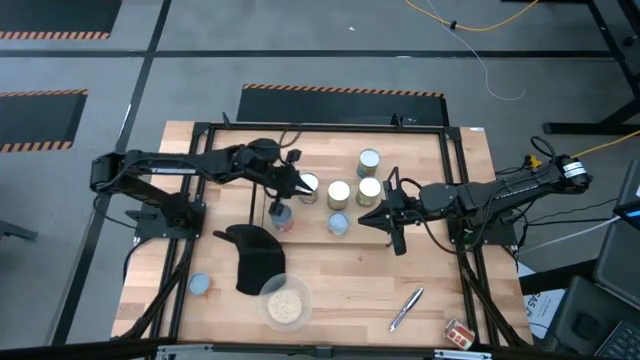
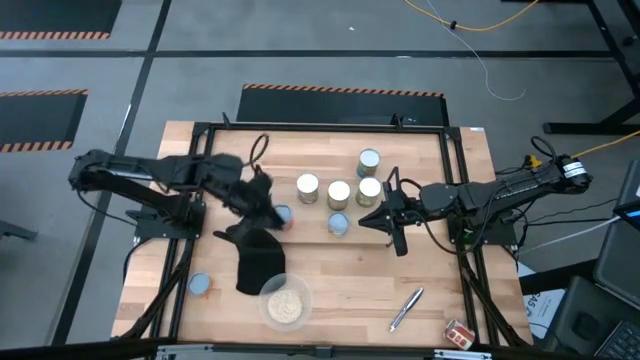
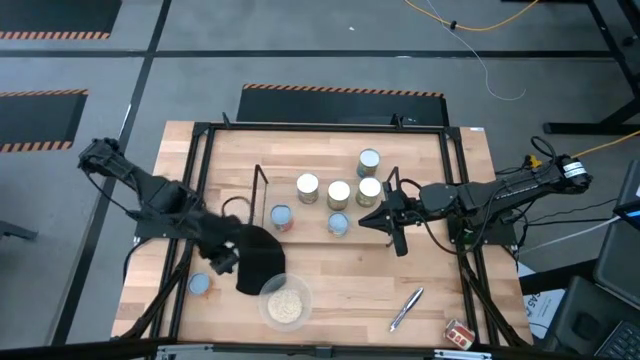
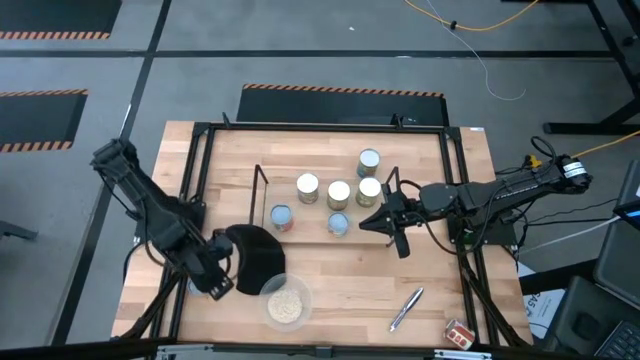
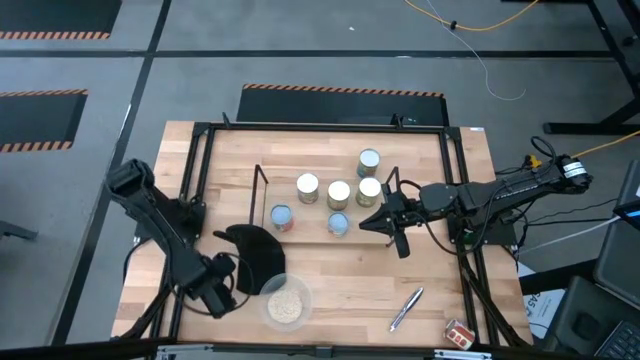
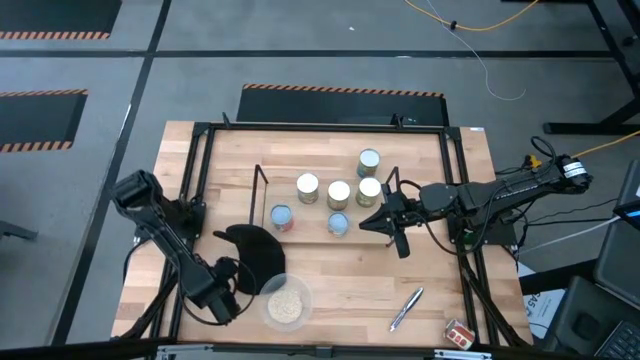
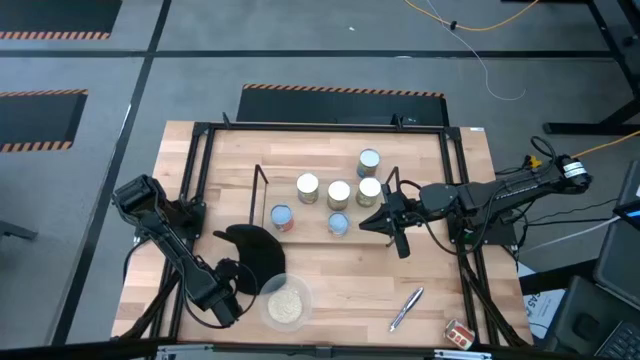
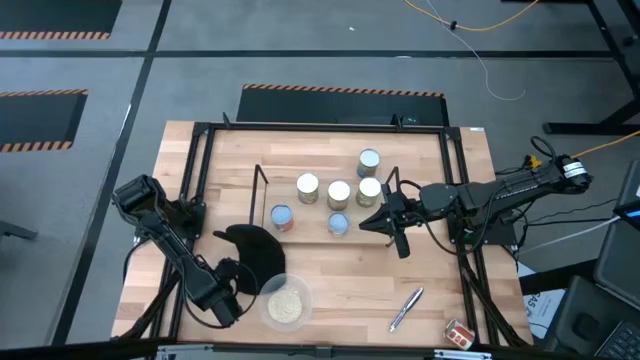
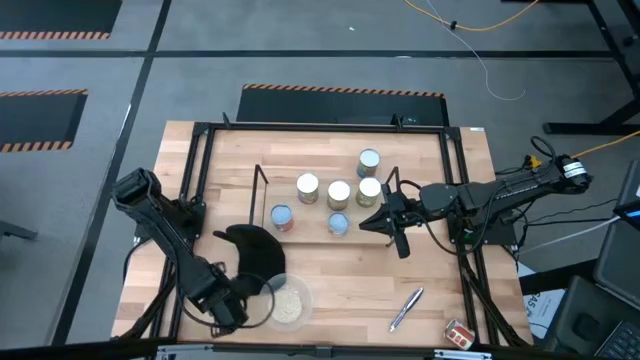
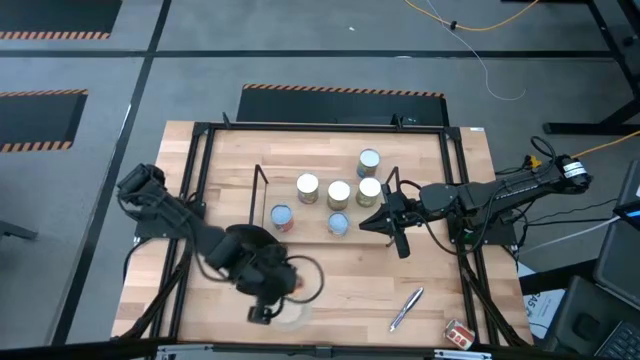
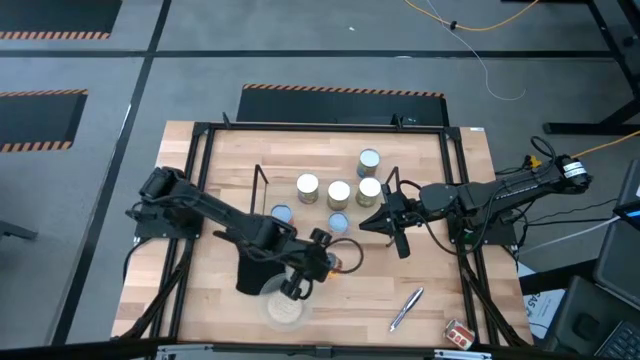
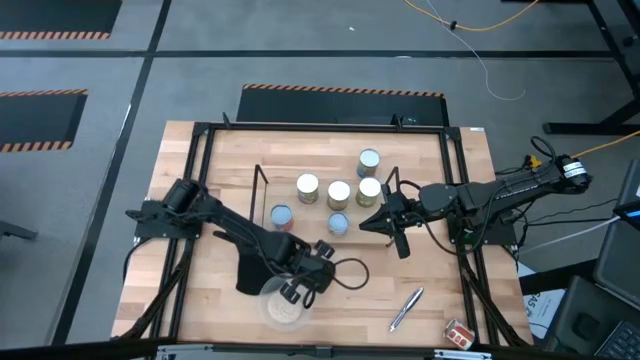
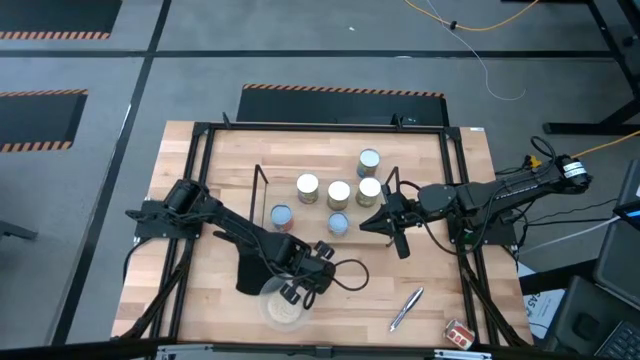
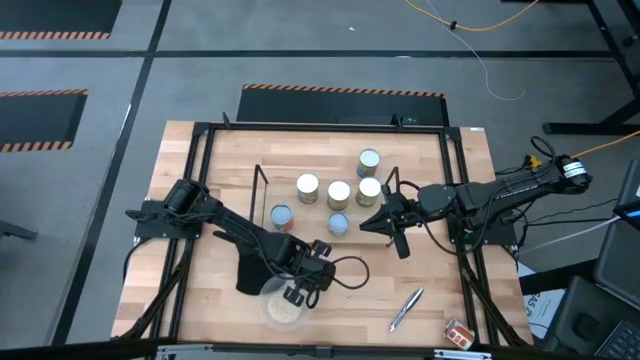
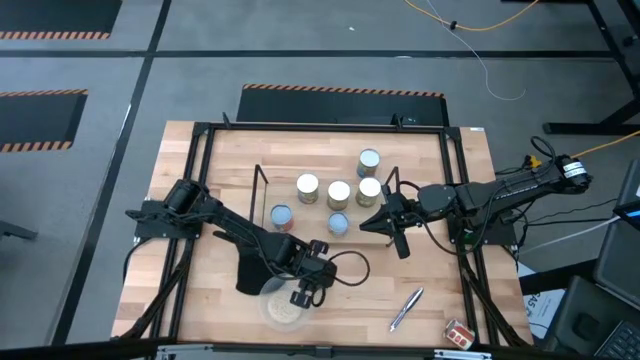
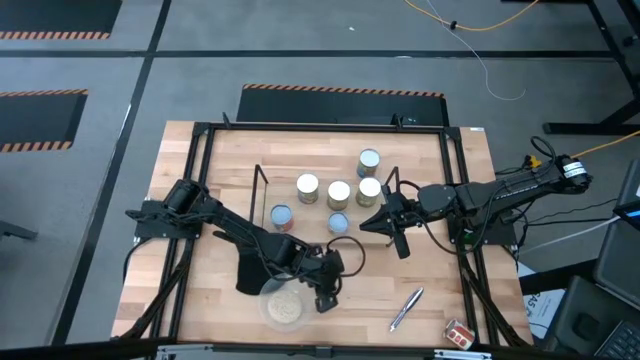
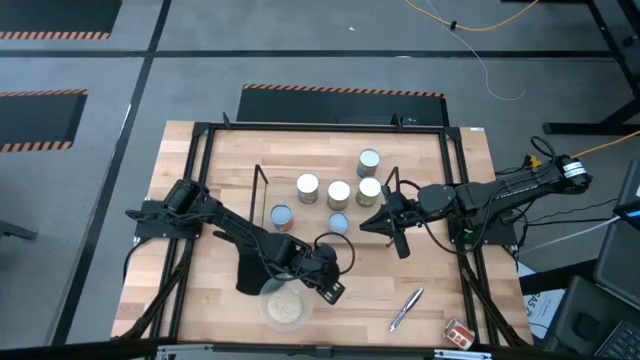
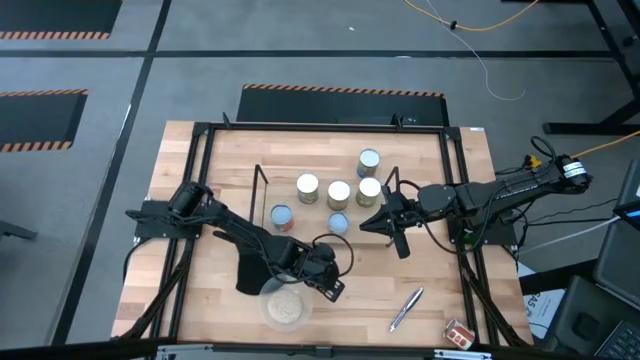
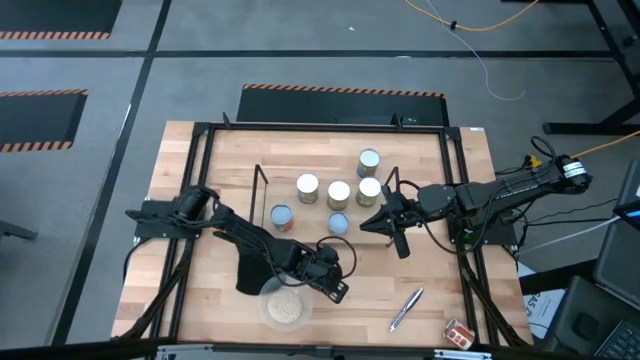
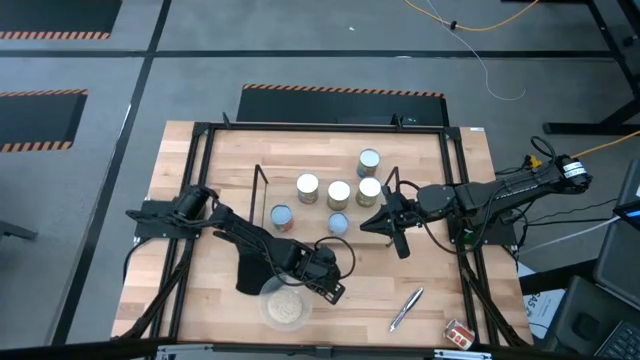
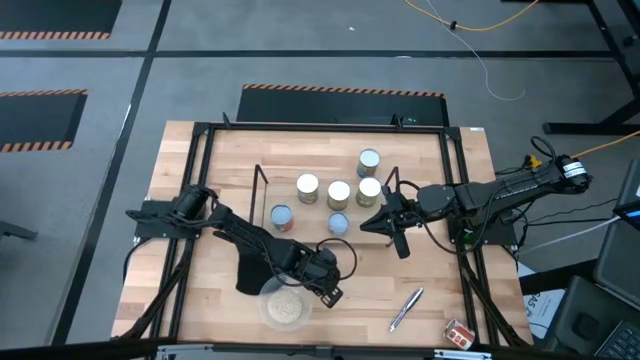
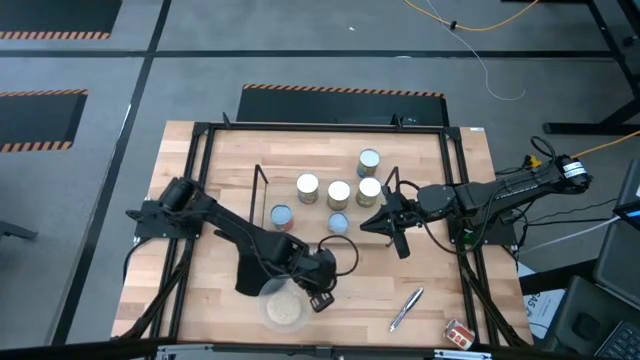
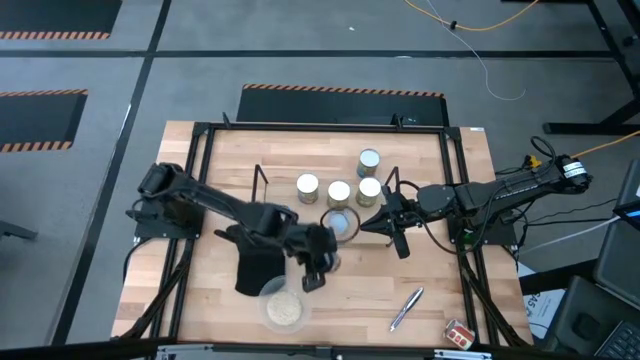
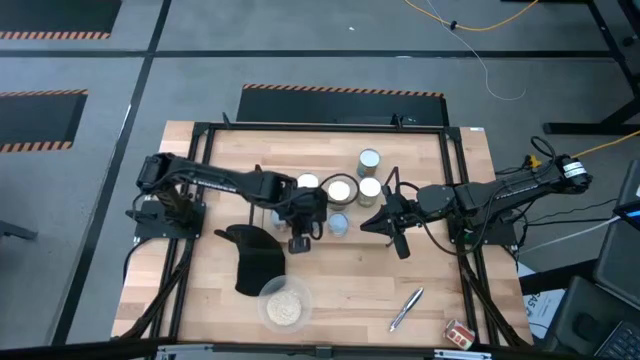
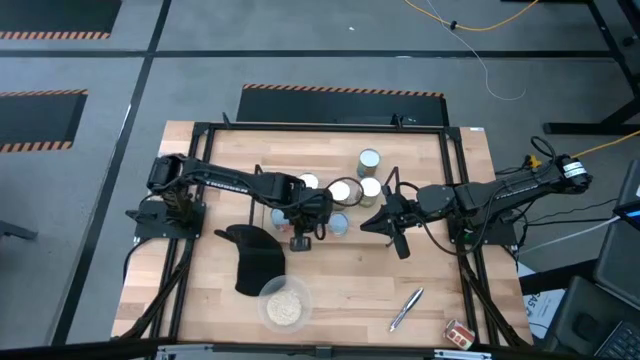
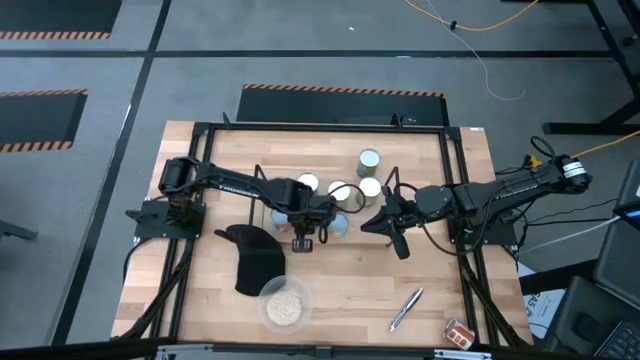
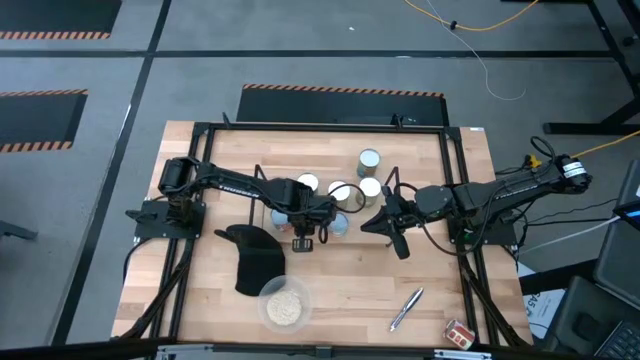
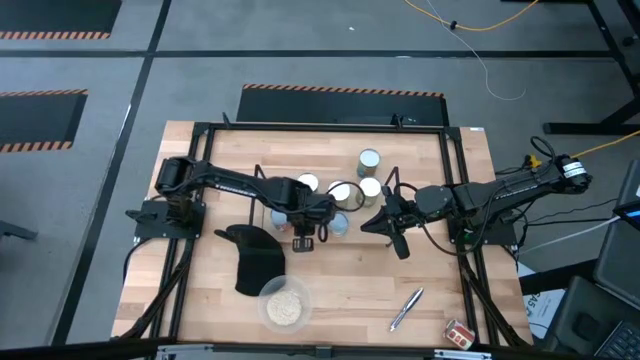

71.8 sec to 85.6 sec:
Task: Pick and place cans onto a shelf
Put the canned pineapple ring can on the shelf
